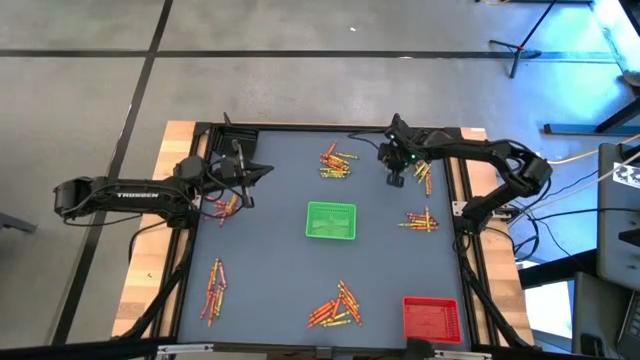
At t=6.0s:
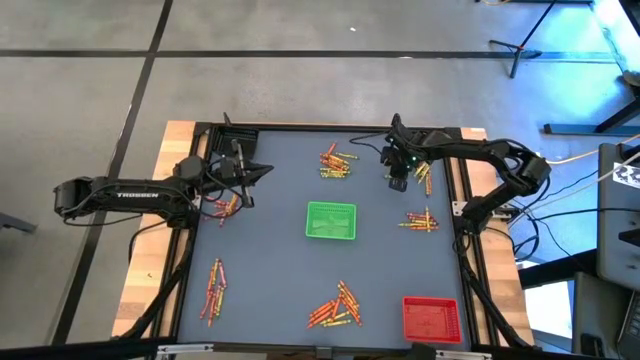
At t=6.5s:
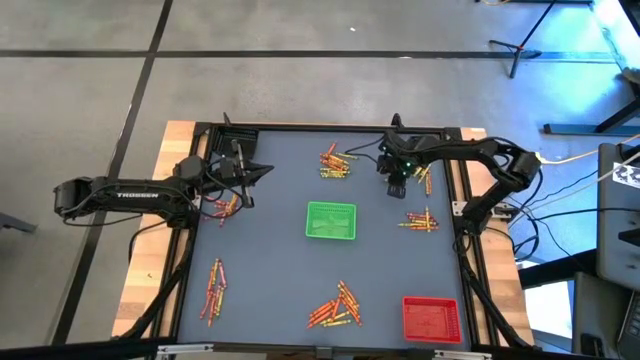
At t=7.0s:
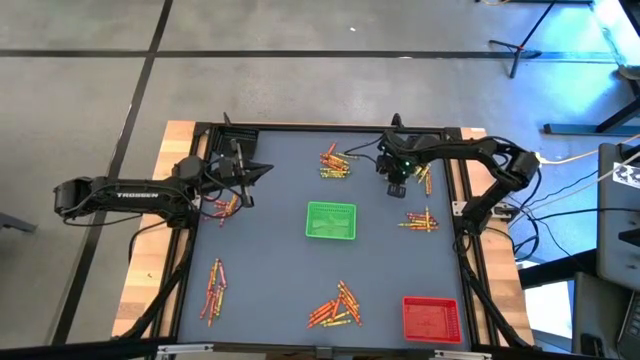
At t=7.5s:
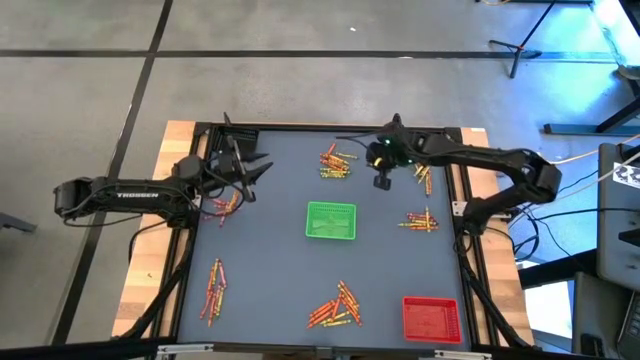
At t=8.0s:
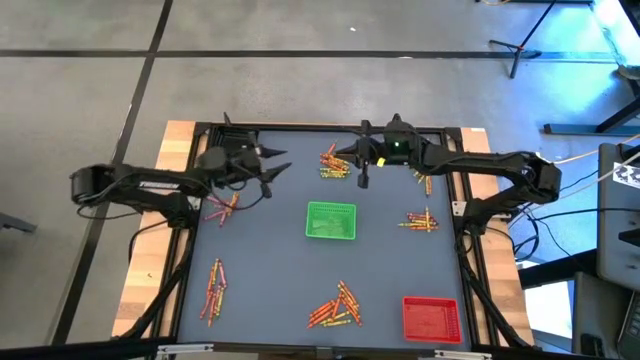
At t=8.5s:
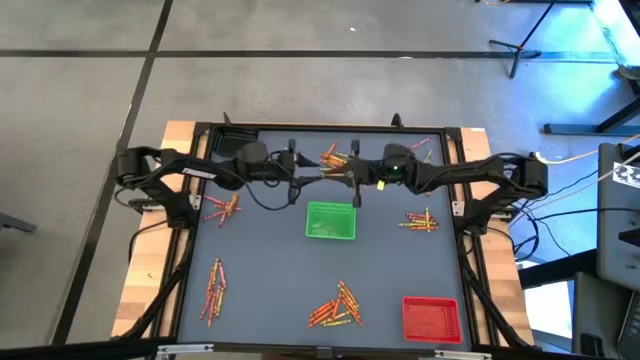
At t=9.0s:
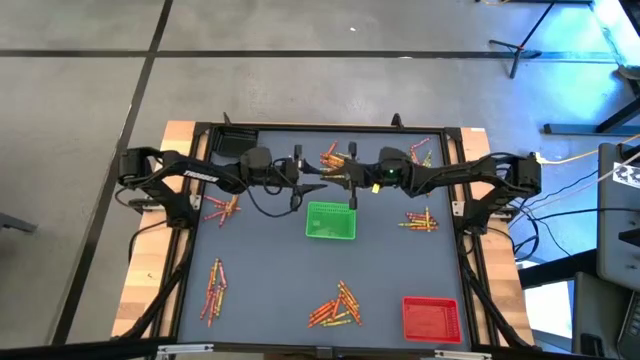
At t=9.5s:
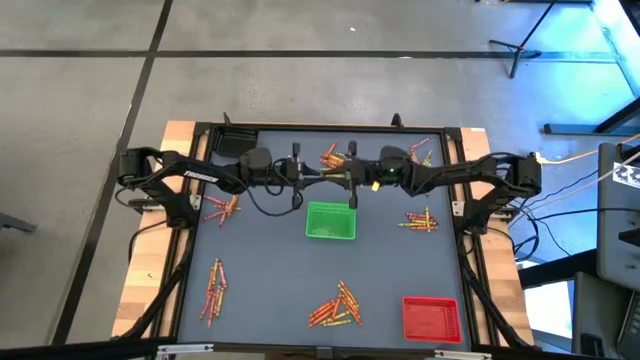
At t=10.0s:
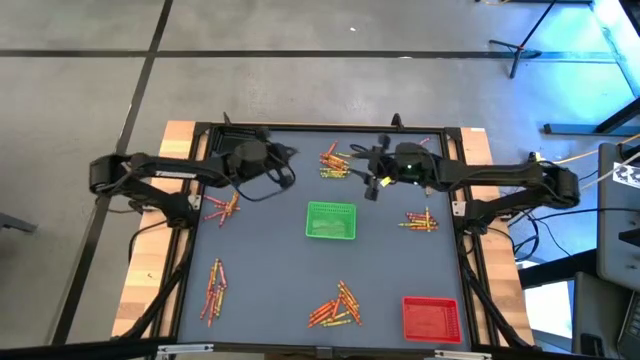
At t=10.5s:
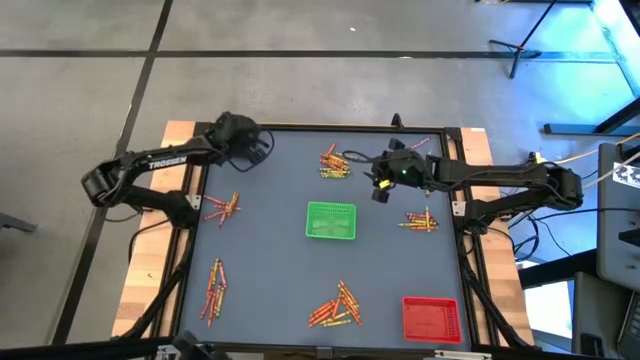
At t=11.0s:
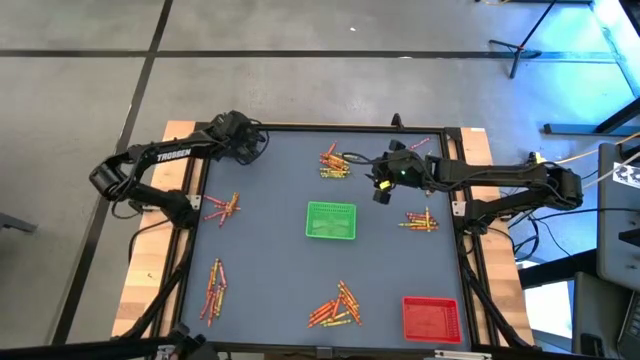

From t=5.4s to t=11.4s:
Task: Sort crayons
Put the green crayon into the black bin

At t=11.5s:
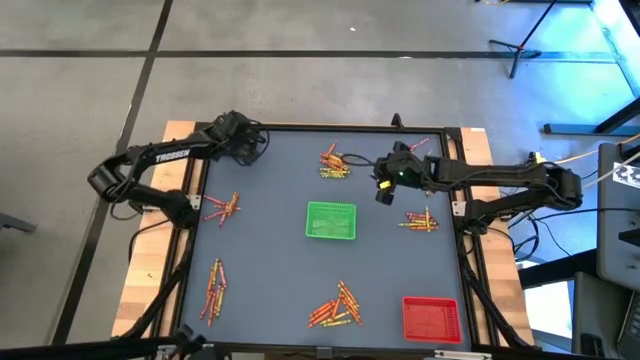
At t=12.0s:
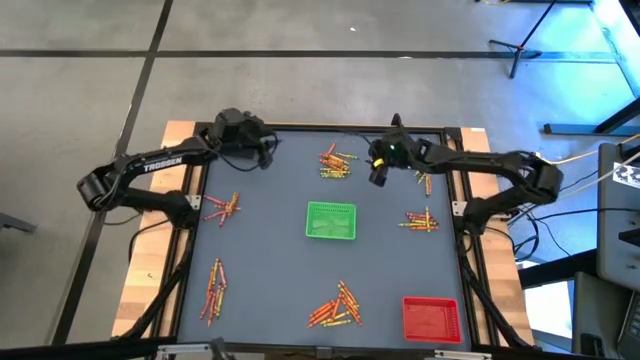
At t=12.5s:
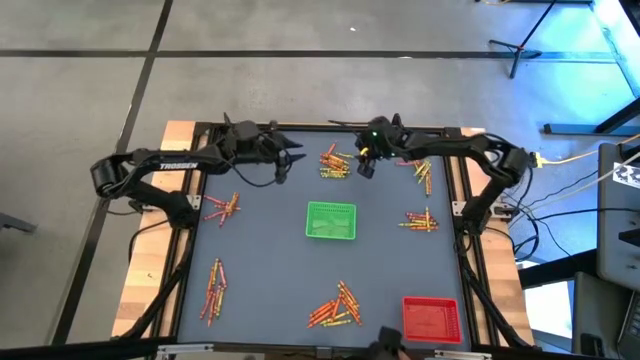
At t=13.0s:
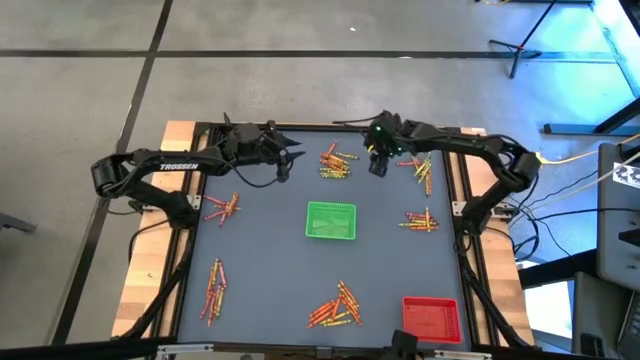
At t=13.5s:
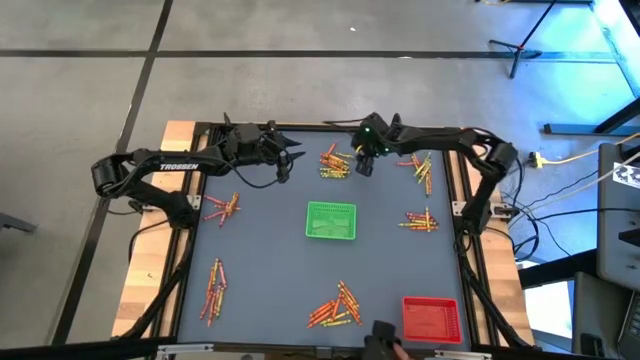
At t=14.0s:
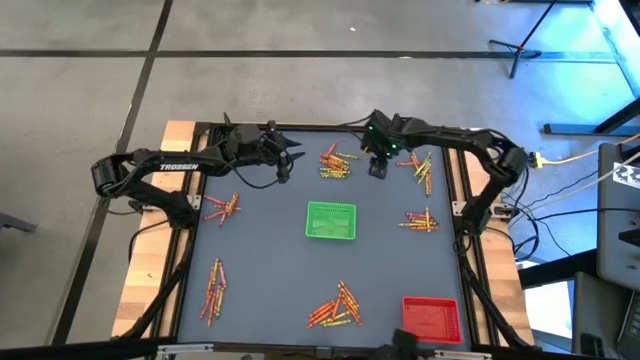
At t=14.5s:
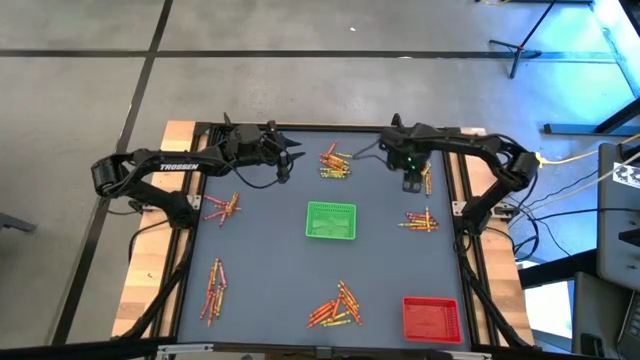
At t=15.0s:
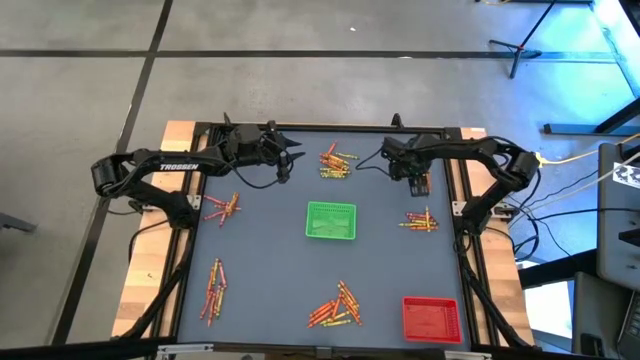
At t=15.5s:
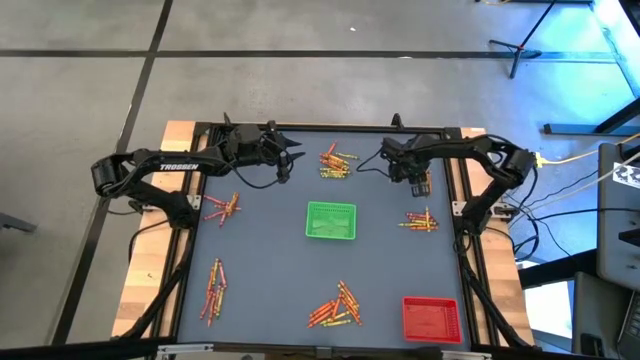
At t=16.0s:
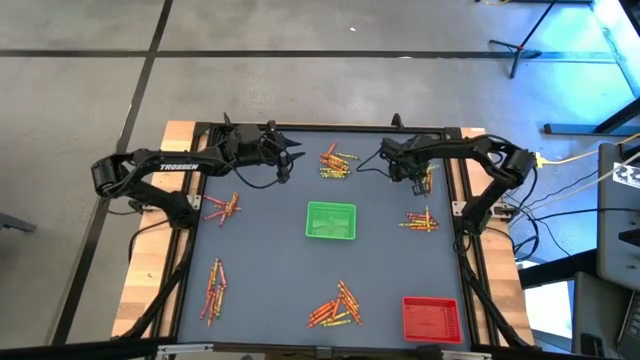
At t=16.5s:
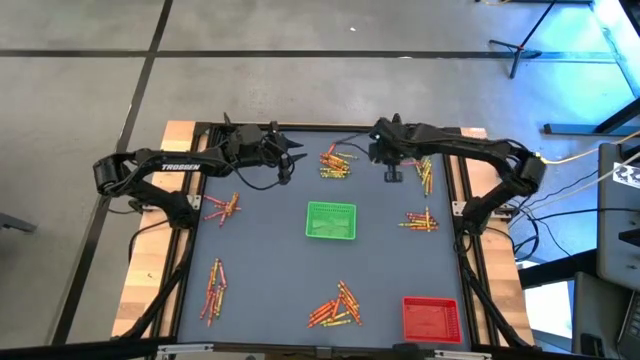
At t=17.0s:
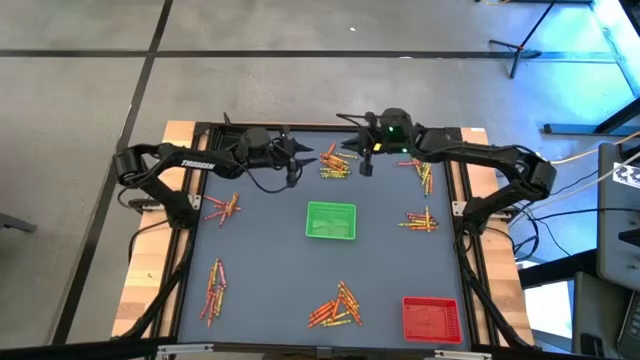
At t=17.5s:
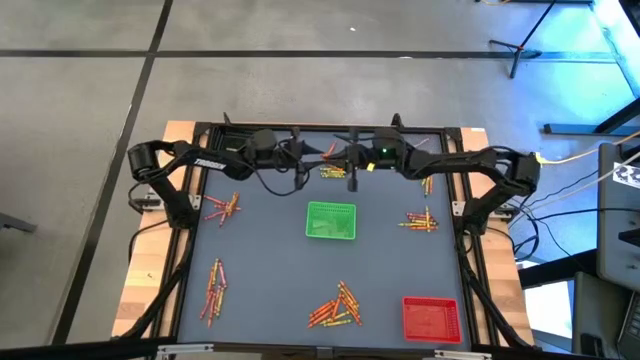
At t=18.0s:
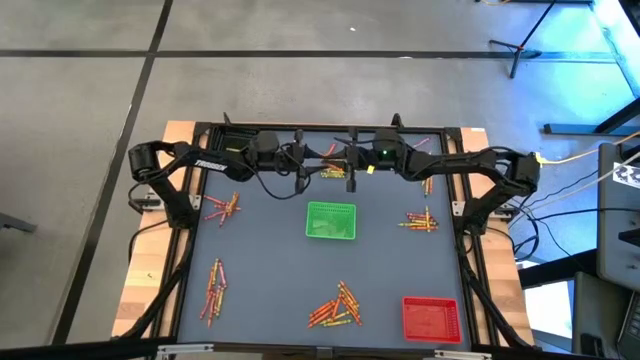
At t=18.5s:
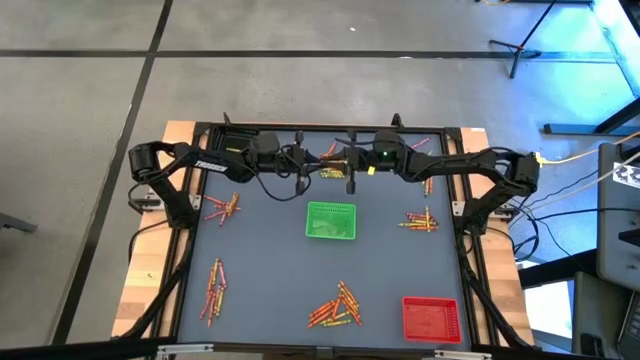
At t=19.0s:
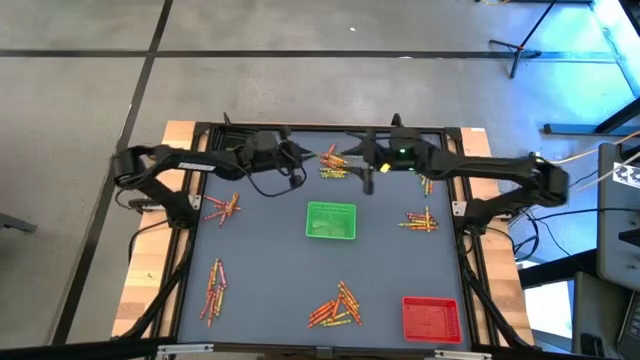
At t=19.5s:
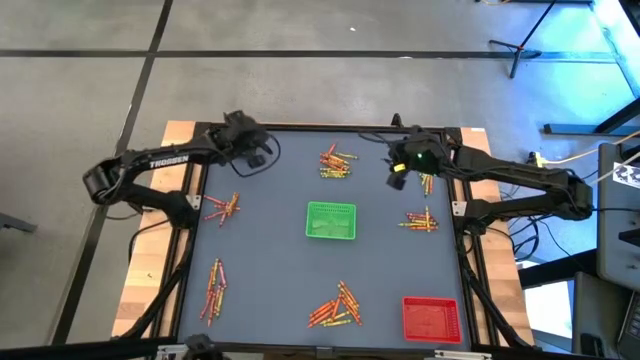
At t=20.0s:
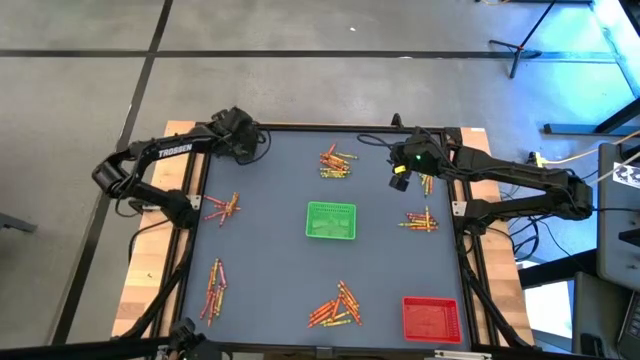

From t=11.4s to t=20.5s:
Put the green crayon into the black bin

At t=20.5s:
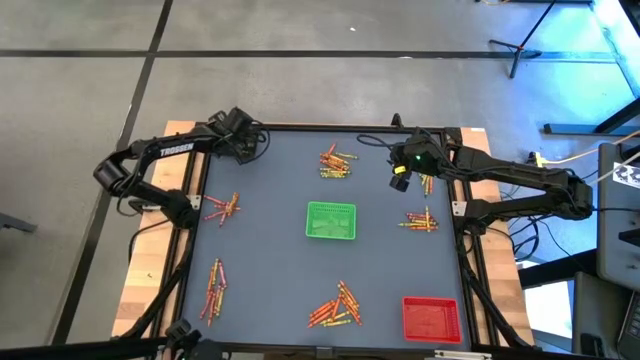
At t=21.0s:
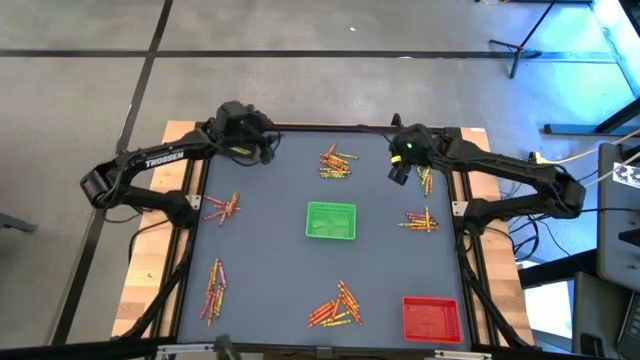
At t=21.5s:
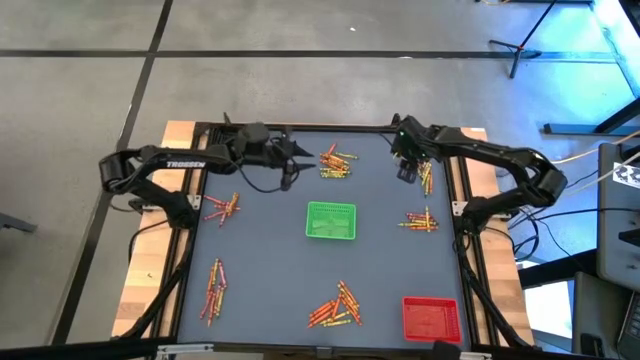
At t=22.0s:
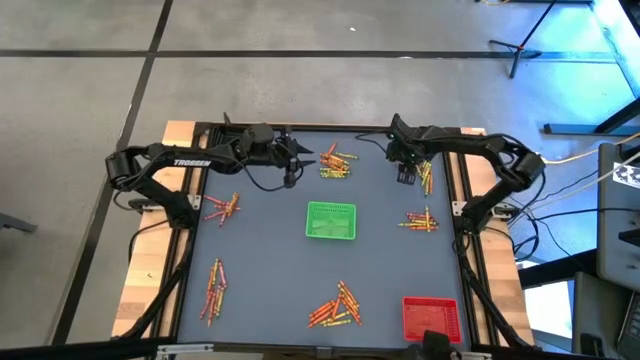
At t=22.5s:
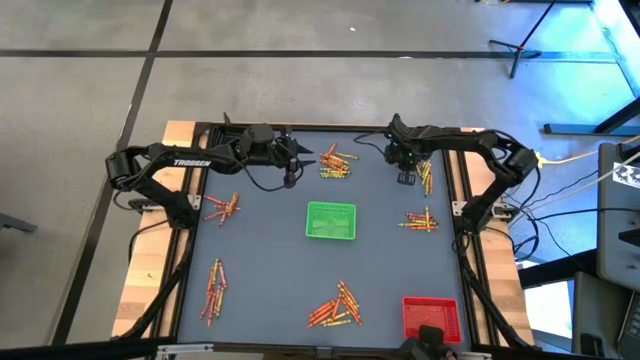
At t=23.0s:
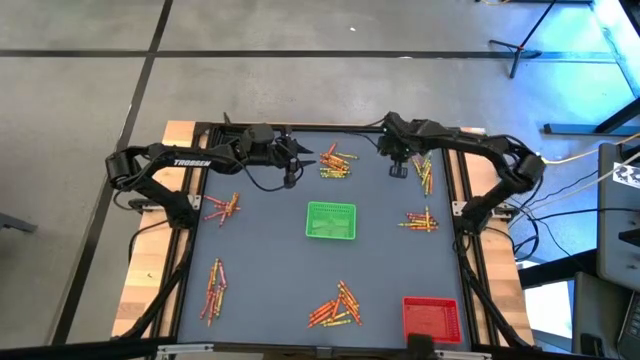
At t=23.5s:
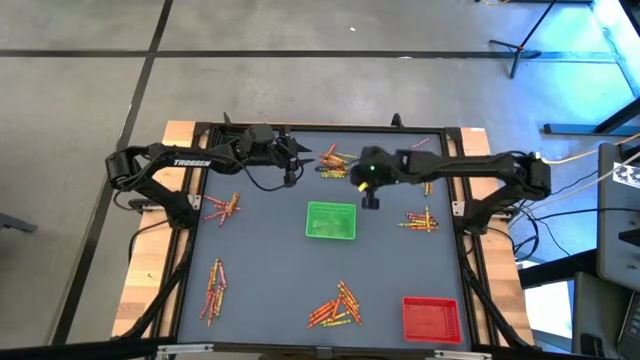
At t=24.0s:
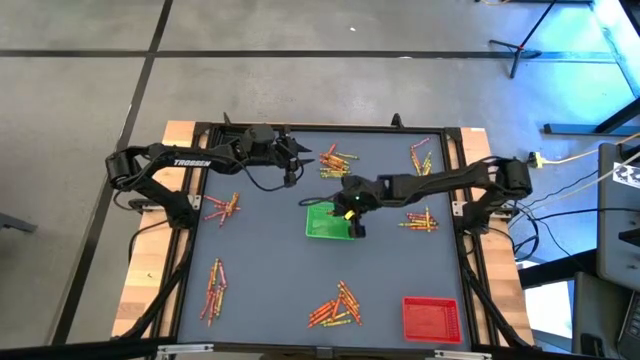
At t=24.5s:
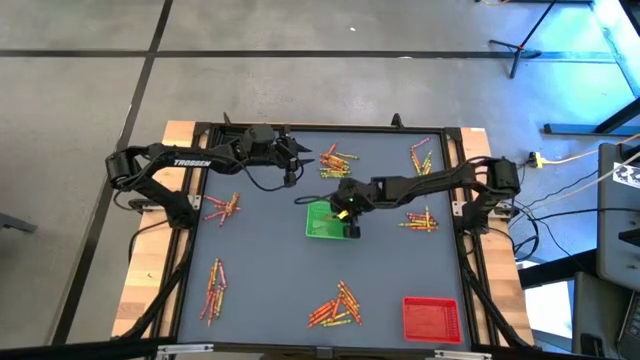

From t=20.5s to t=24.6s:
Put the red crayon into the green bin
